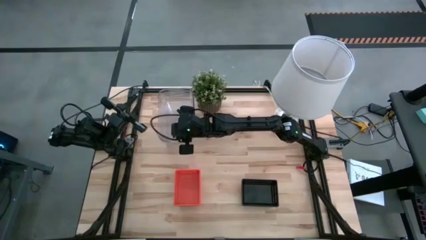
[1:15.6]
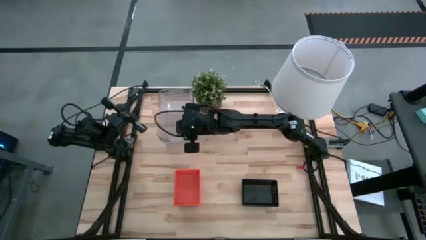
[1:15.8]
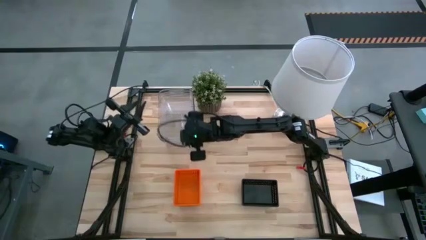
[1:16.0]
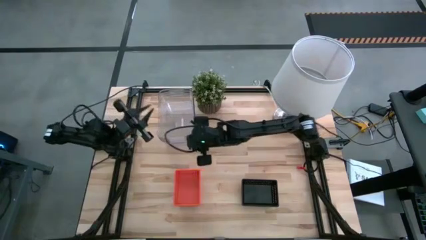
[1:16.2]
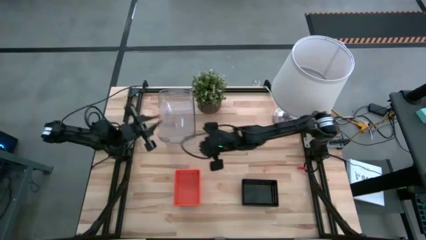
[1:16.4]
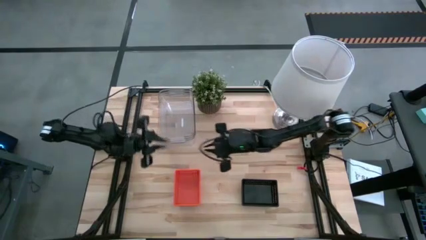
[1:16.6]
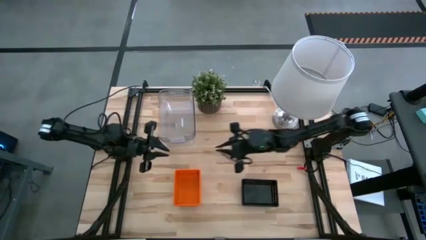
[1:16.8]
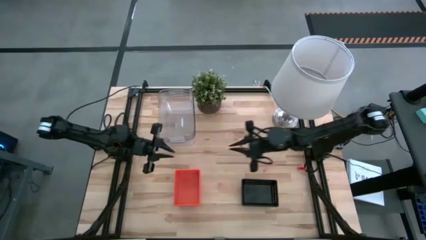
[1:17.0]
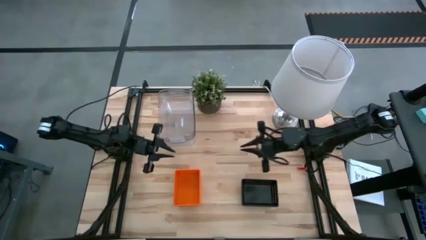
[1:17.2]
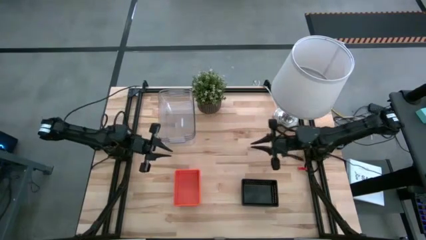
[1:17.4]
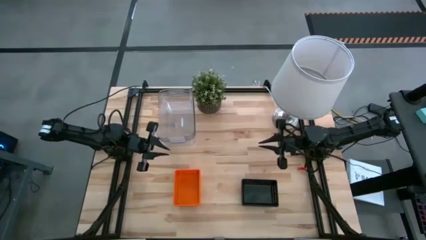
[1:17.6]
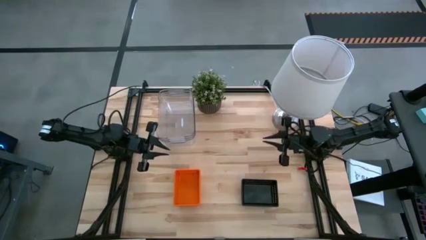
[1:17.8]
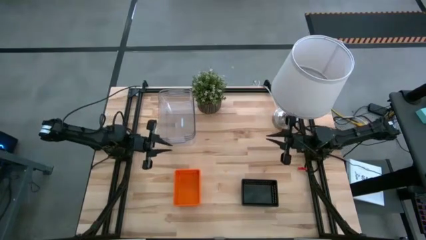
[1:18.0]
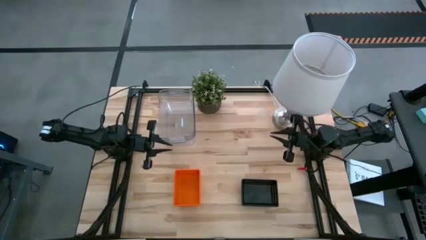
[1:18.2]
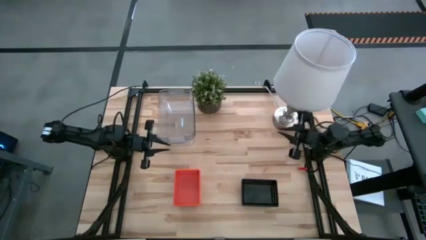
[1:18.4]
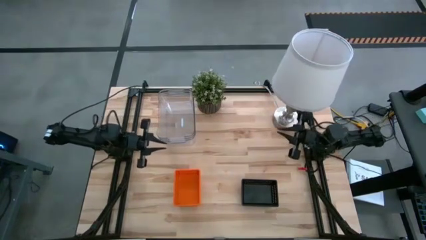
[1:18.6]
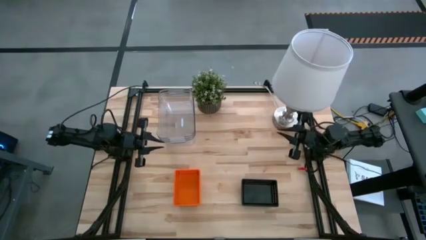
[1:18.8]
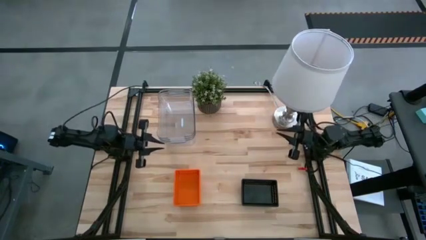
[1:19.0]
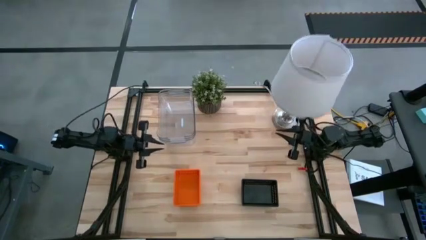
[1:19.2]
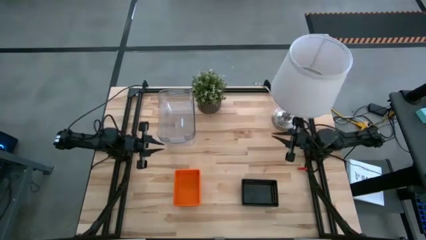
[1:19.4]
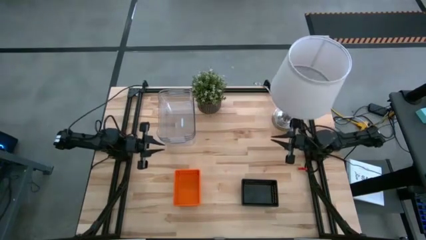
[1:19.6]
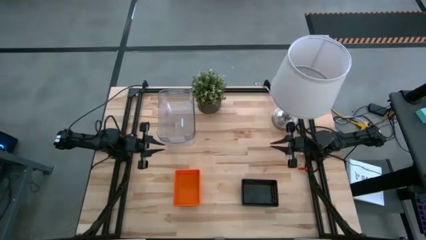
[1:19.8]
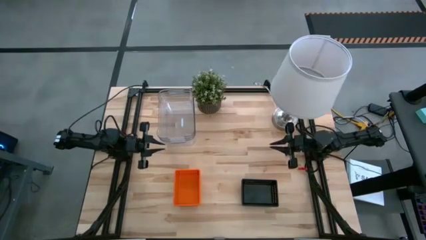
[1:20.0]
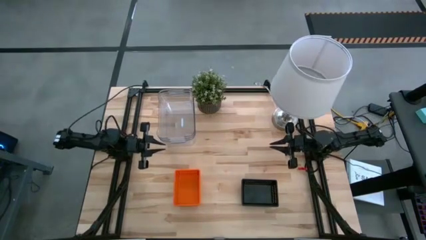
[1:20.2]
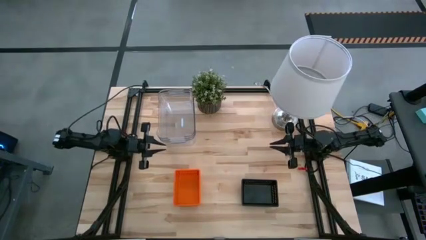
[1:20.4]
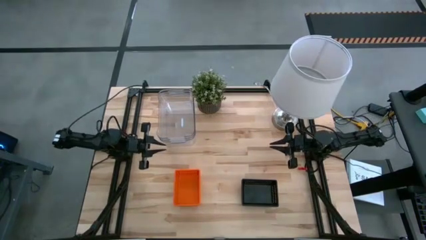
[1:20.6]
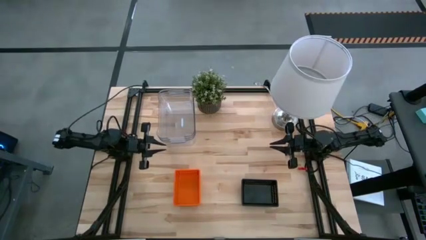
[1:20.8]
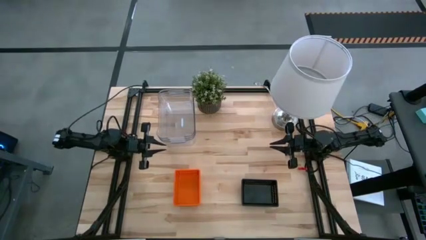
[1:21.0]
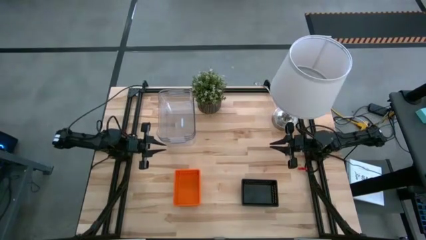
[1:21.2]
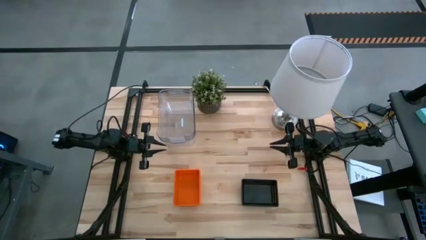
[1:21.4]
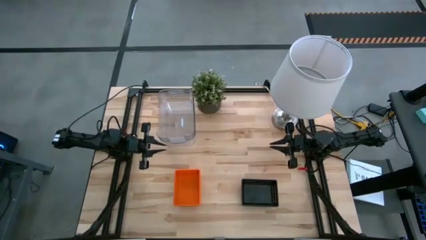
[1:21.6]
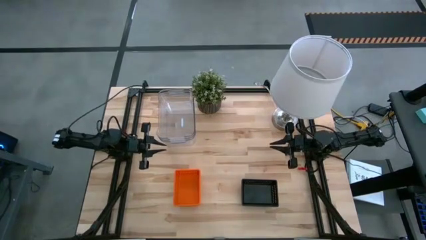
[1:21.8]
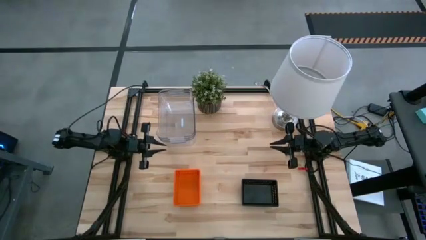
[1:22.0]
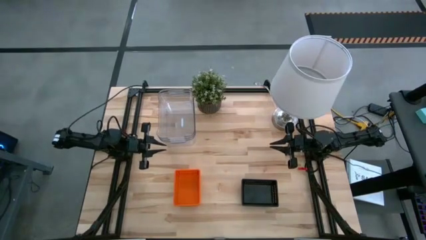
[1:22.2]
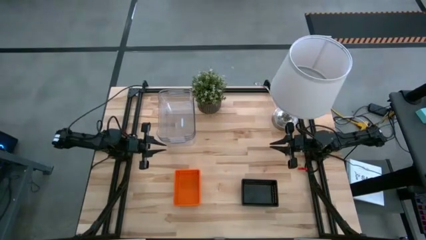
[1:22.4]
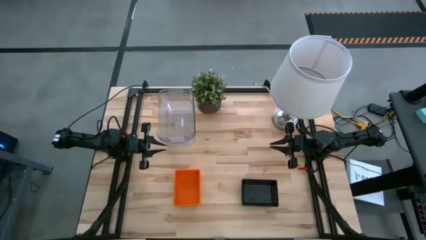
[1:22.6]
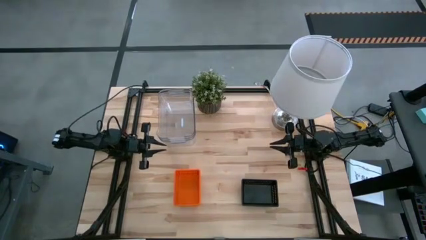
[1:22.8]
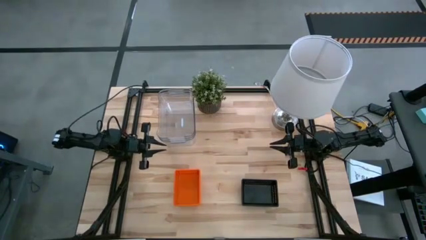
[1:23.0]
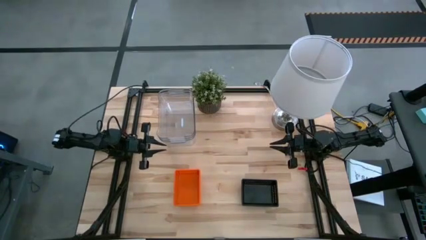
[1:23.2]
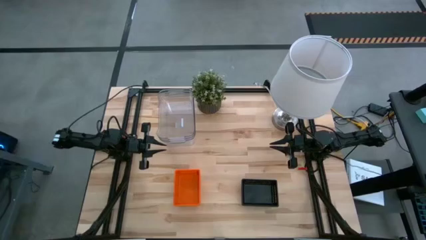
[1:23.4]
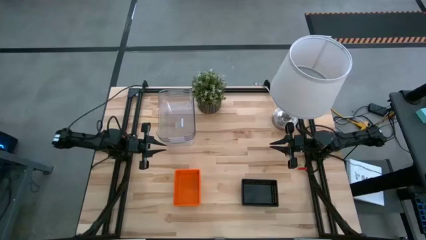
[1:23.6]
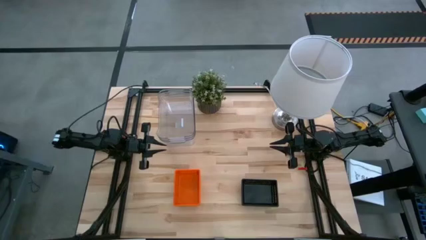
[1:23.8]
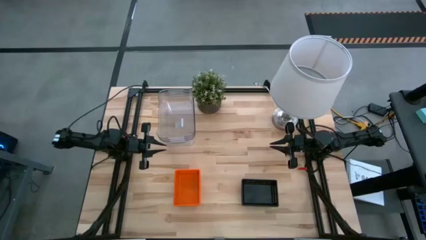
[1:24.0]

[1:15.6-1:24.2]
Return to Home Position

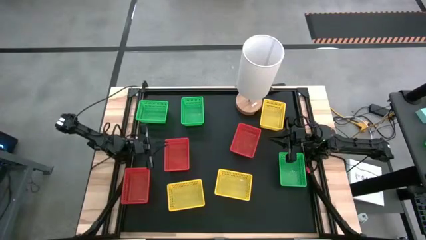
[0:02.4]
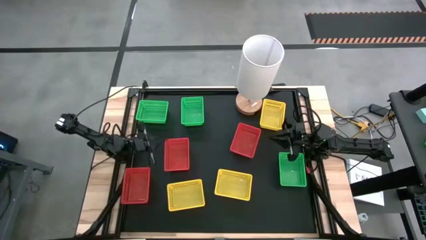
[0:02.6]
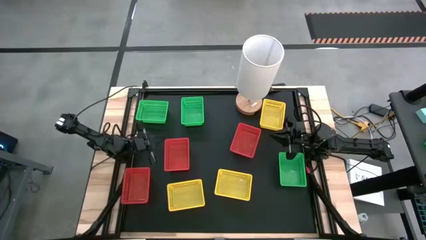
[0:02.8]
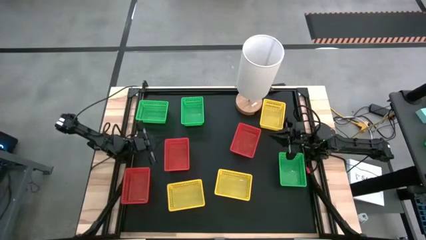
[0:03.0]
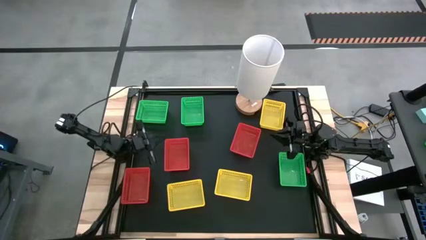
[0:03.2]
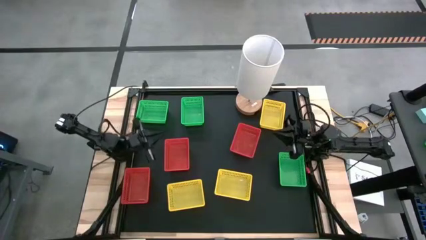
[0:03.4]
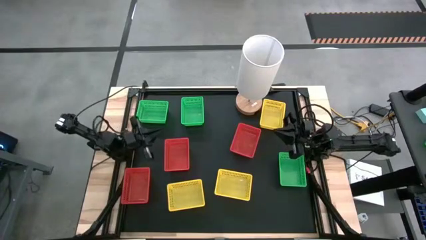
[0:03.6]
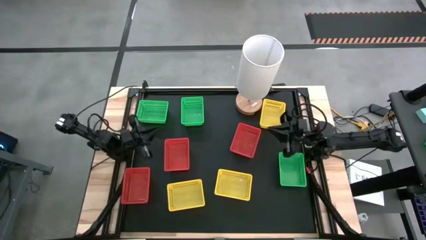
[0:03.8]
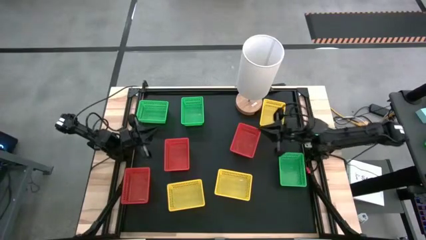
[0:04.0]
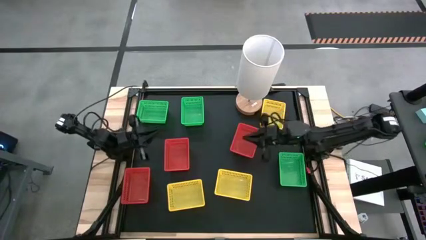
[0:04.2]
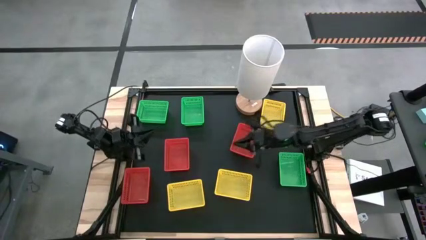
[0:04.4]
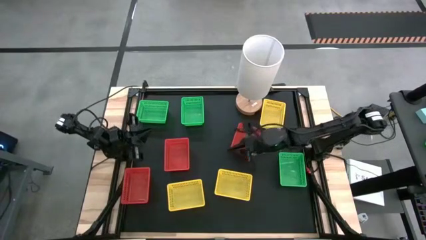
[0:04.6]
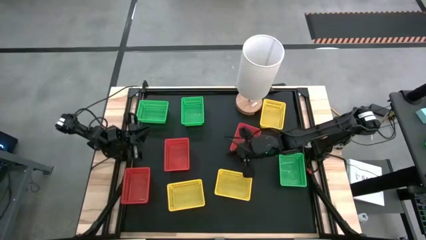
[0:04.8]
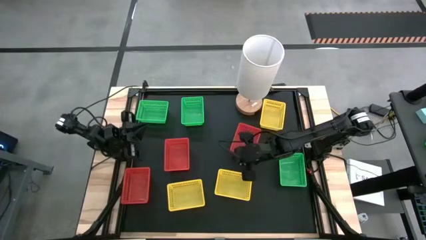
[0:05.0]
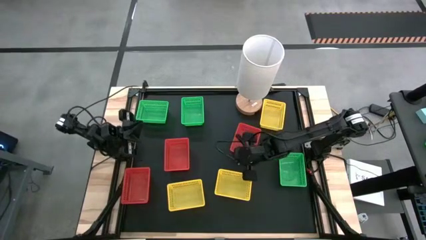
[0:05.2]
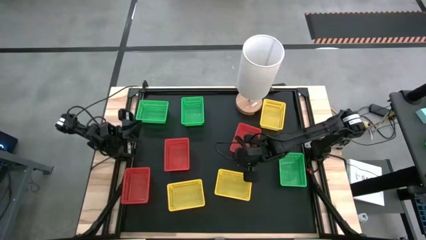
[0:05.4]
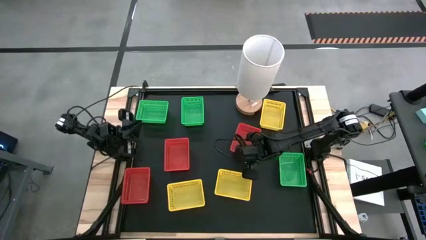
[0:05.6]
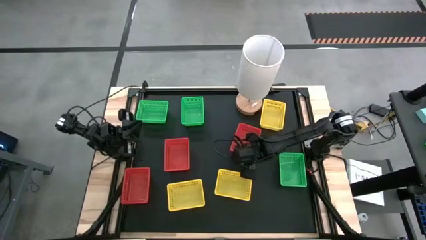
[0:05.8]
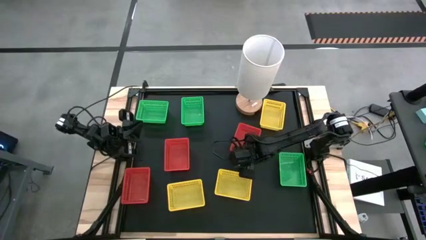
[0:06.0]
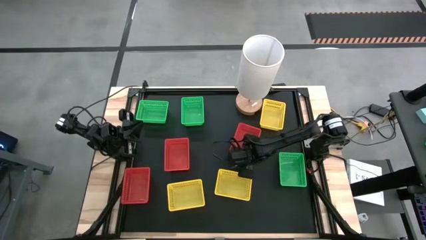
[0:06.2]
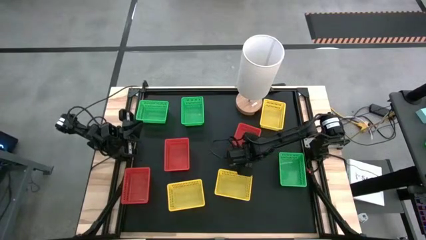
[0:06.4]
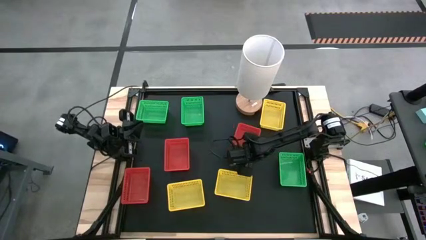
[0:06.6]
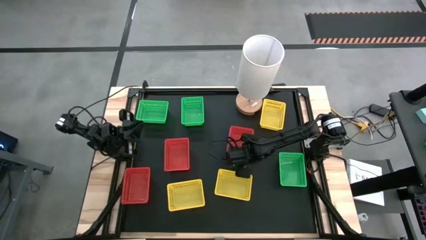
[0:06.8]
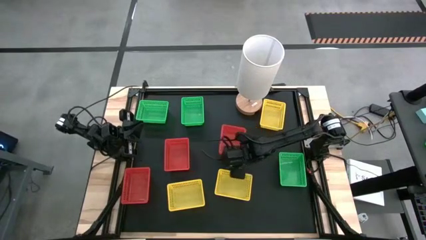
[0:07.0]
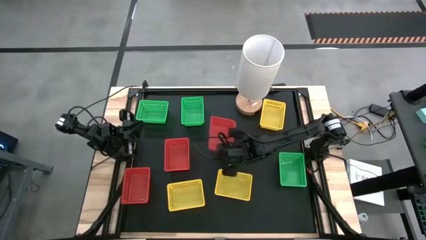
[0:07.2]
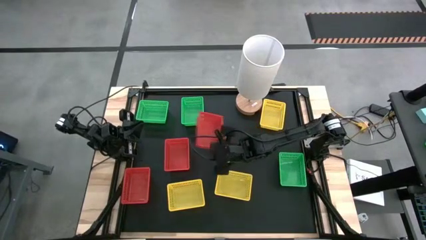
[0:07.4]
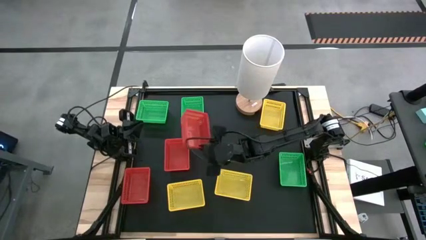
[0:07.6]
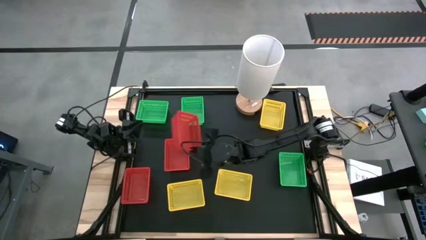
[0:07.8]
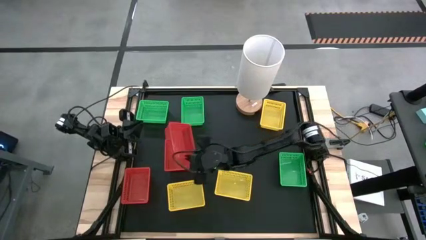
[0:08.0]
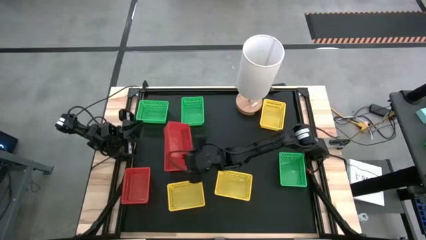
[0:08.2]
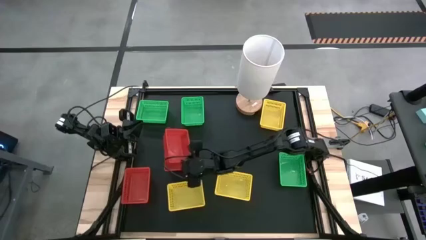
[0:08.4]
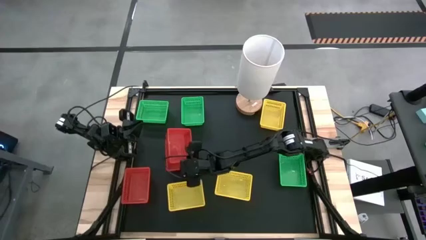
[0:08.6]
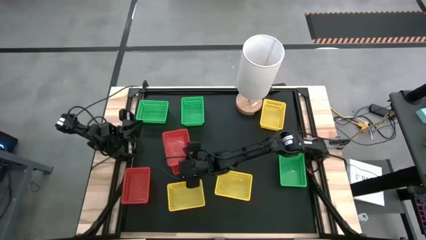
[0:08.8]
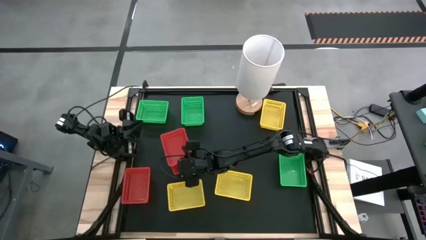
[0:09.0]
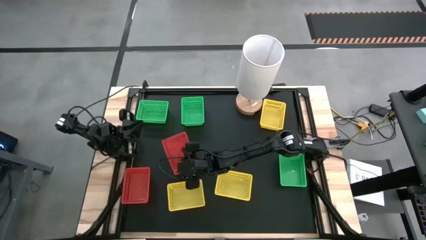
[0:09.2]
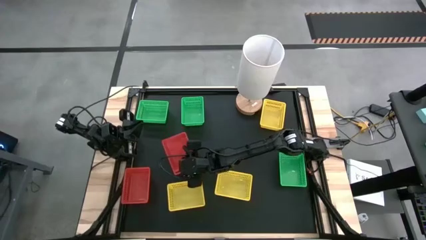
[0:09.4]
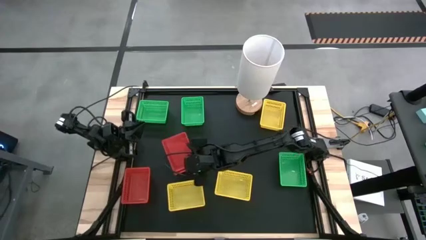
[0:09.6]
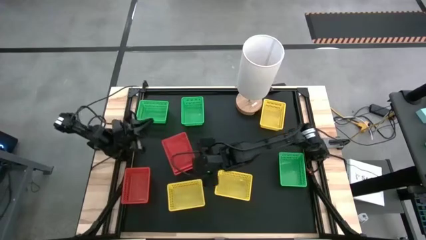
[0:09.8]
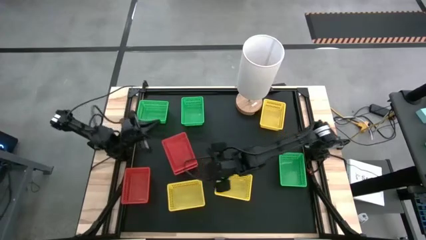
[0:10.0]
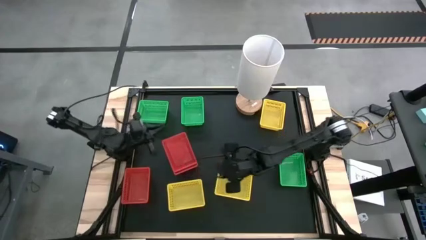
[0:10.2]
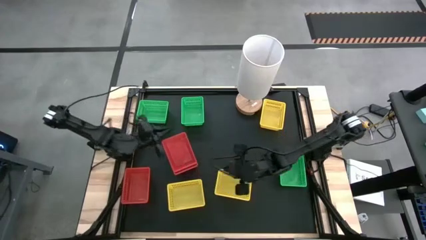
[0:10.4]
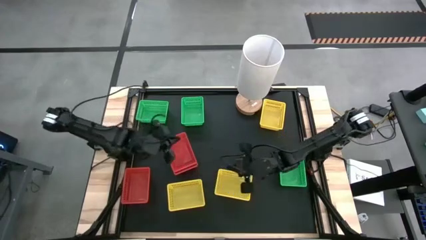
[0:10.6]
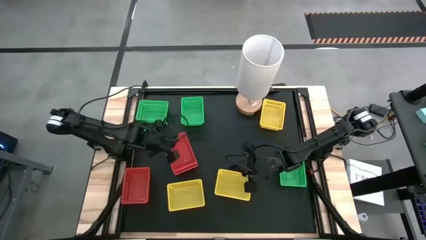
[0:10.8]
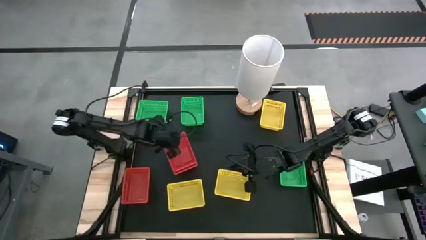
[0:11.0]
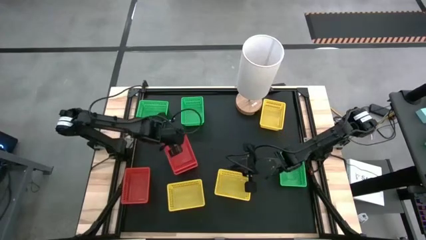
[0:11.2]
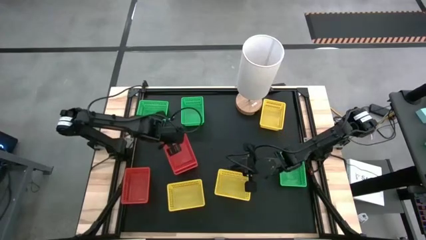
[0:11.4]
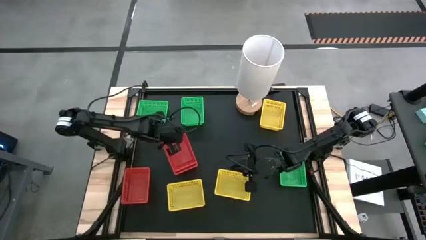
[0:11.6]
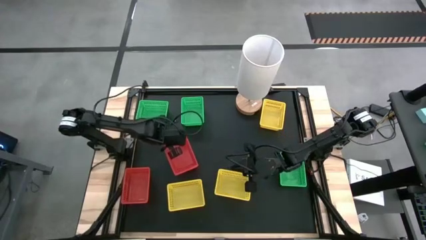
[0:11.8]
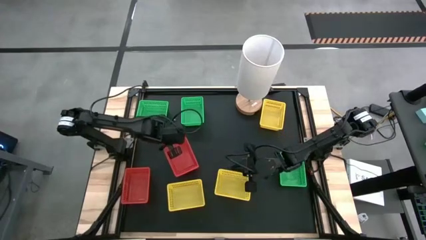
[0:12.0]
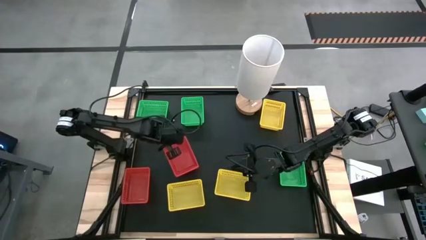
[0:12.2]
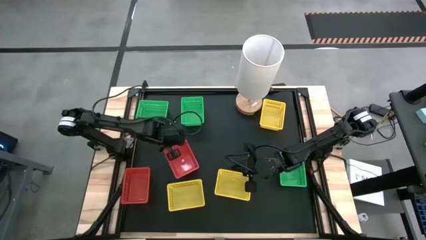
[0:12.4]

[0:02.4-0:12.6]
Stack the top right red bin on top of the middle red bin
